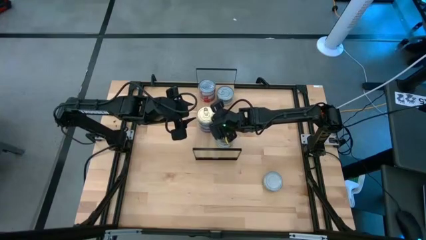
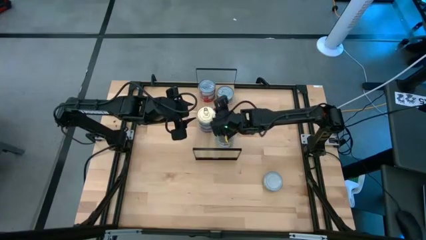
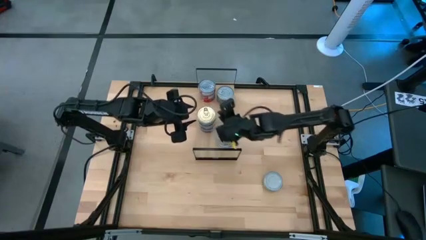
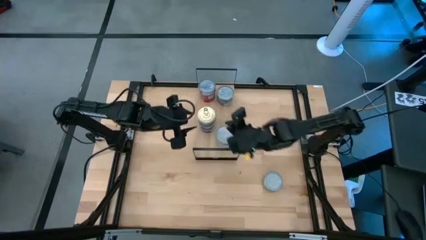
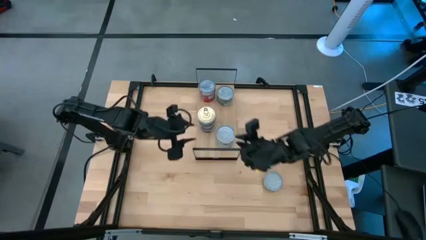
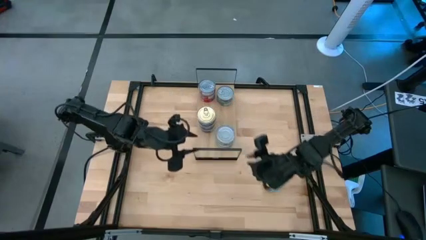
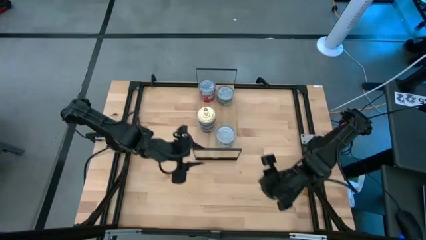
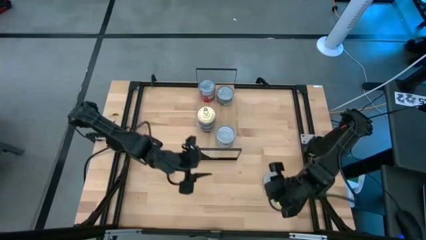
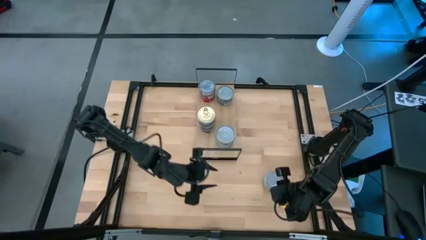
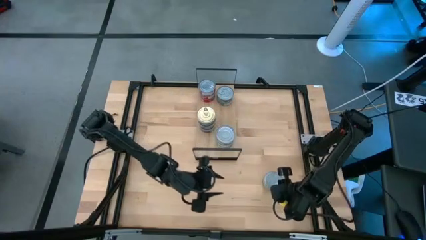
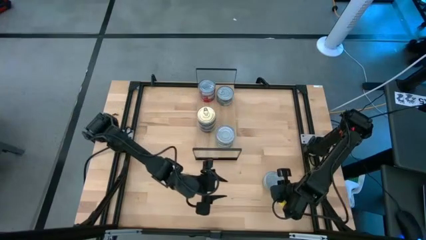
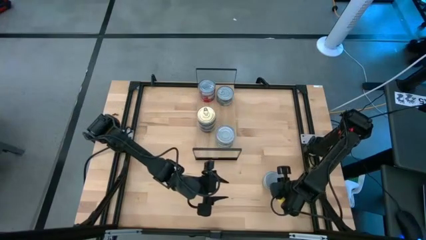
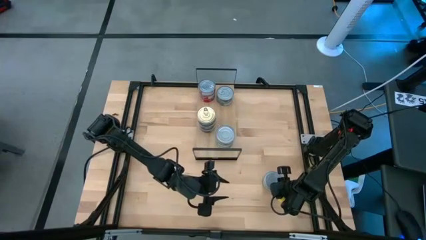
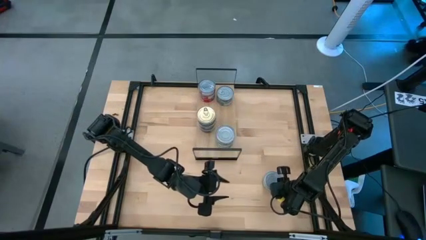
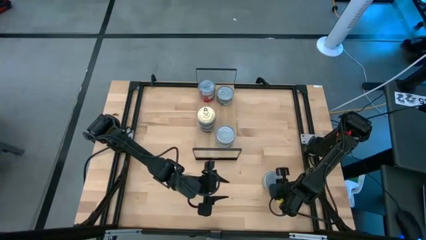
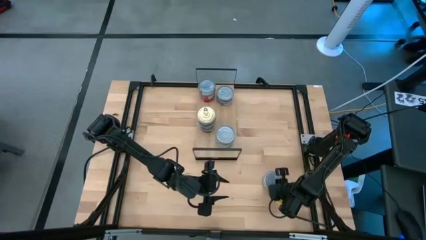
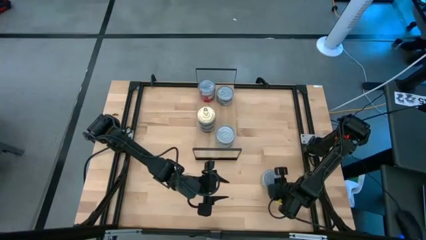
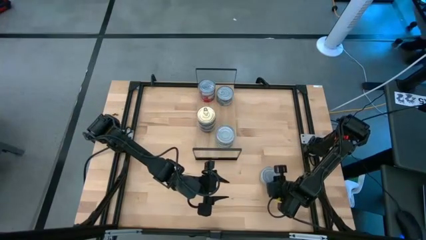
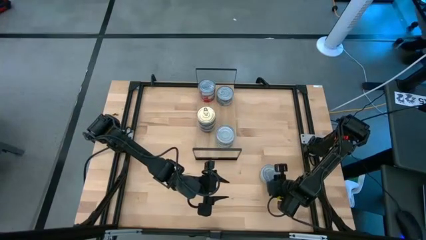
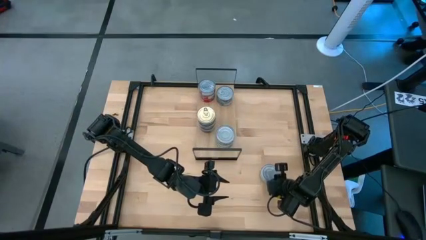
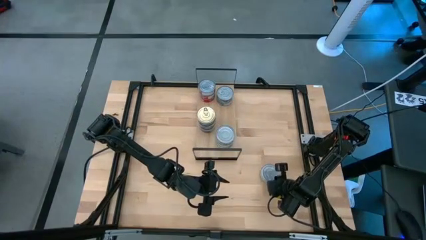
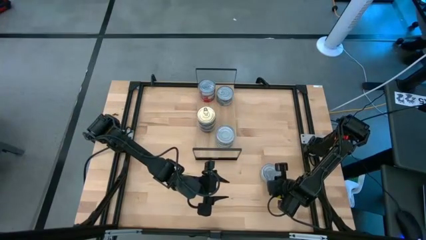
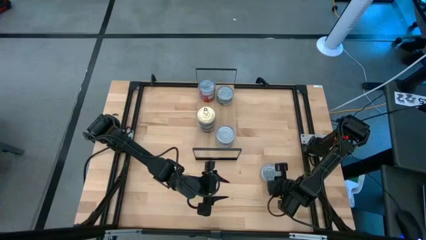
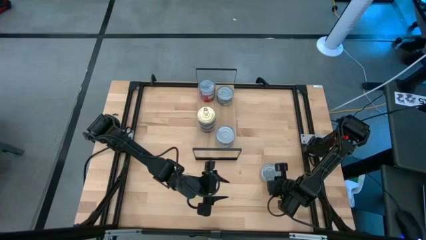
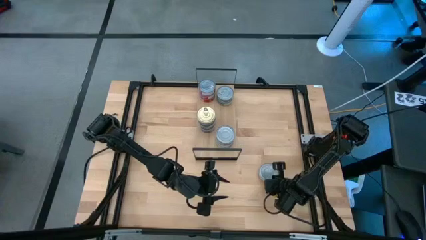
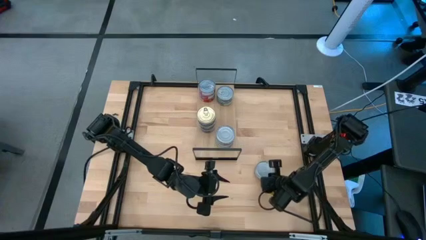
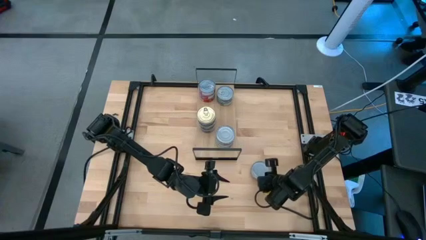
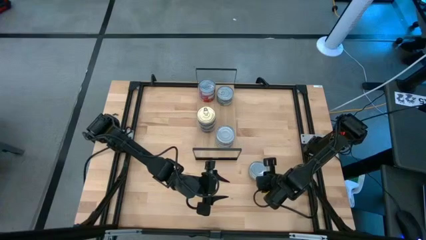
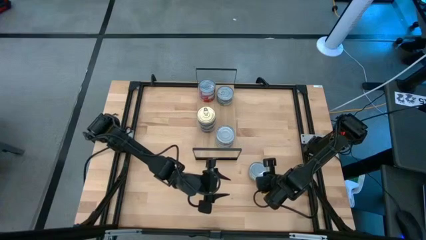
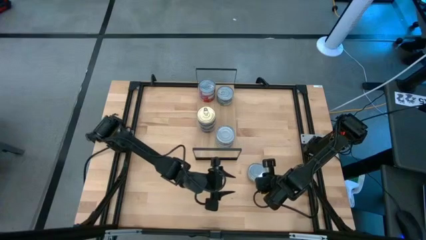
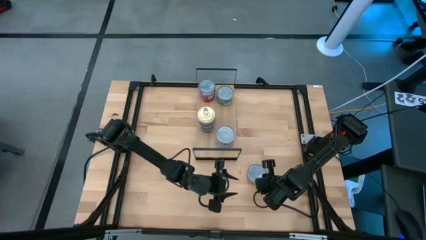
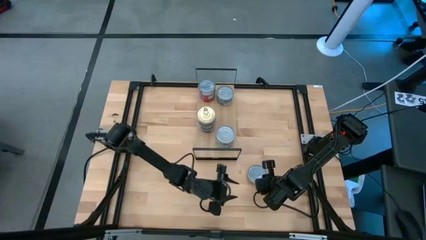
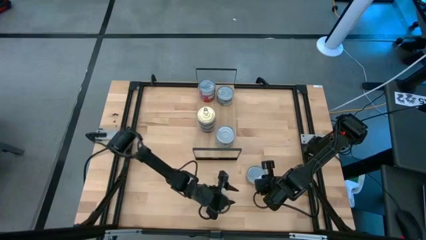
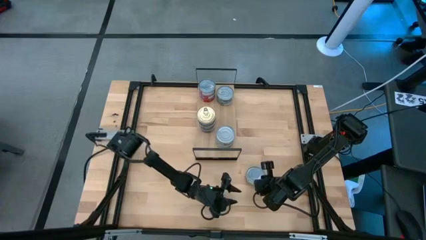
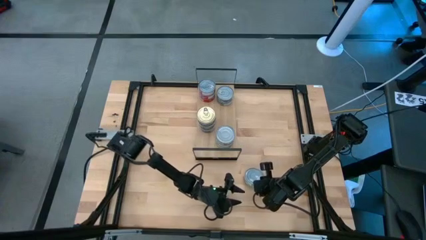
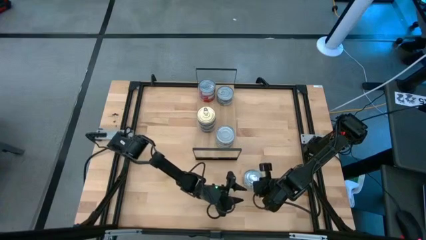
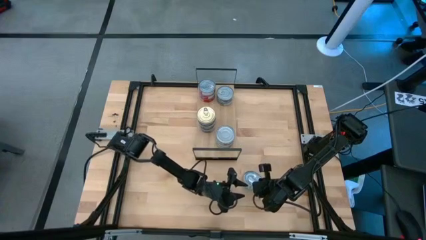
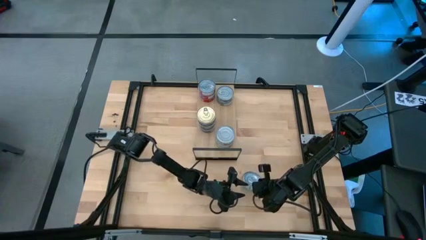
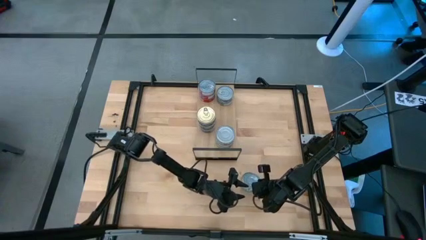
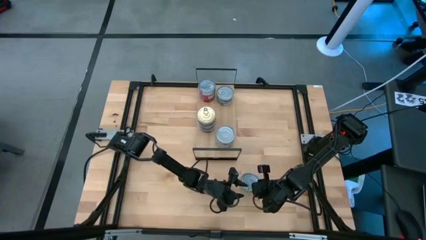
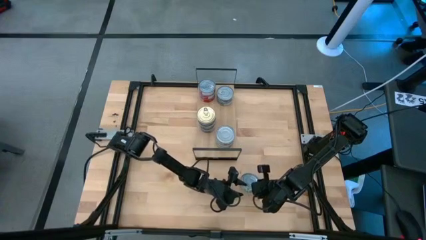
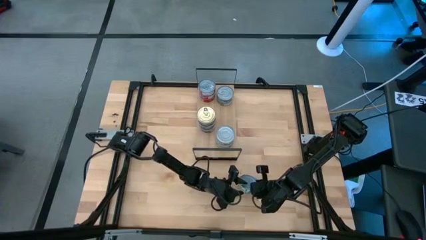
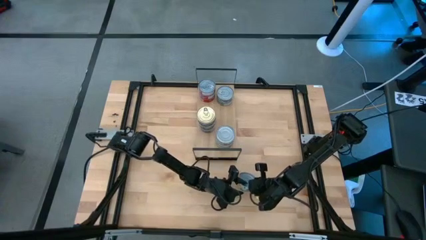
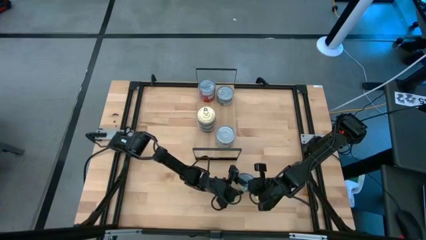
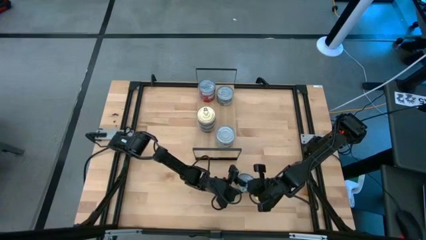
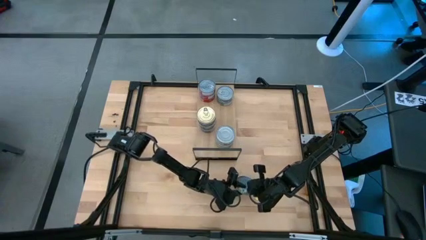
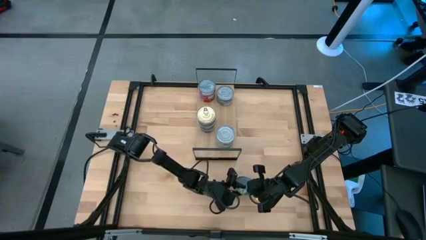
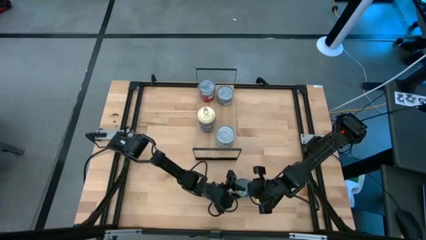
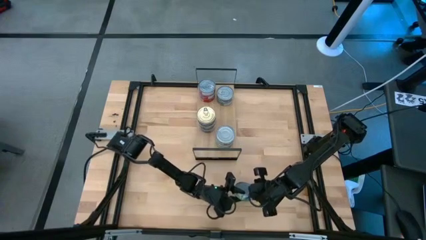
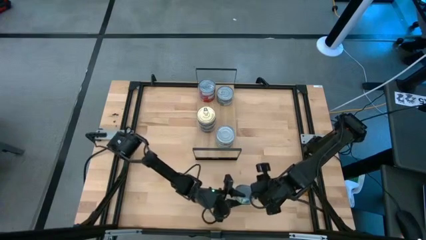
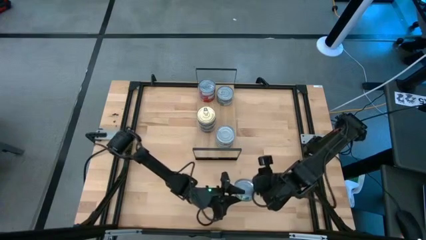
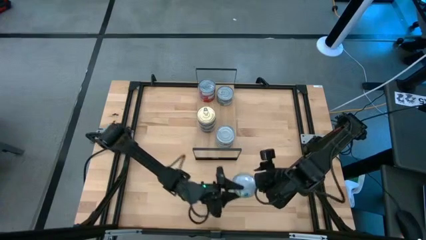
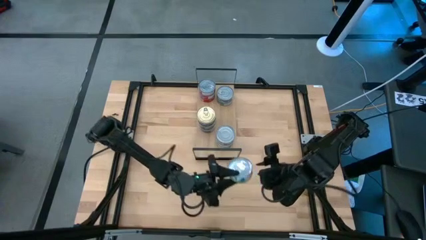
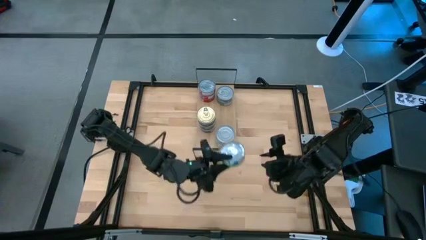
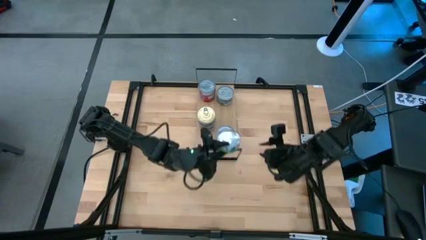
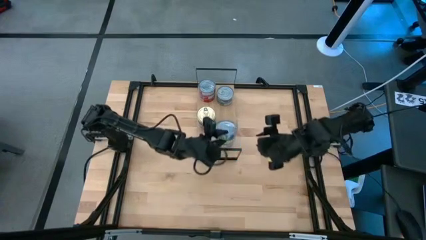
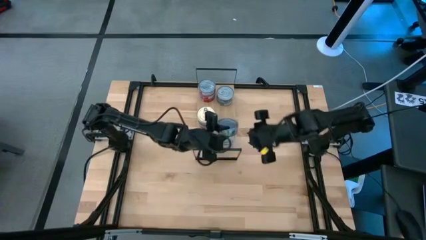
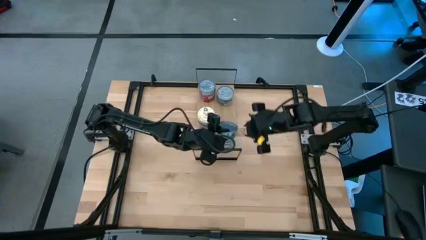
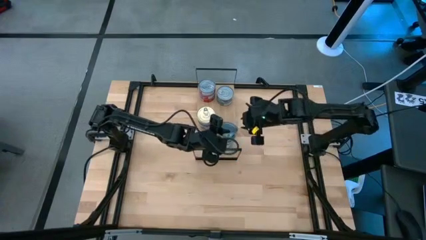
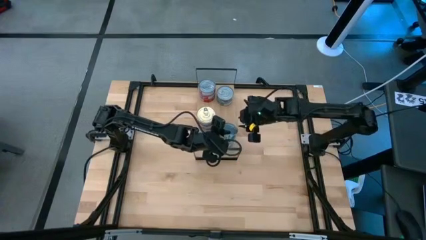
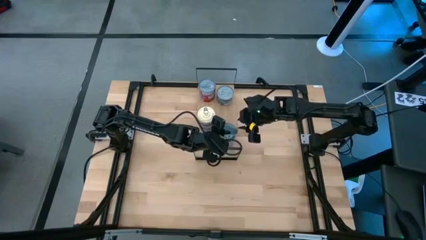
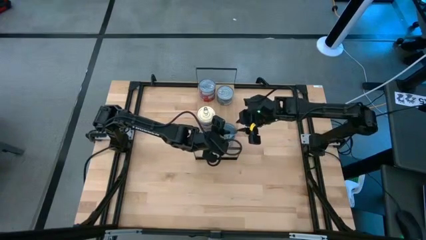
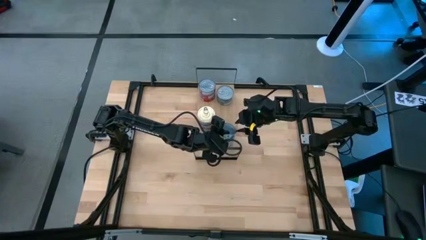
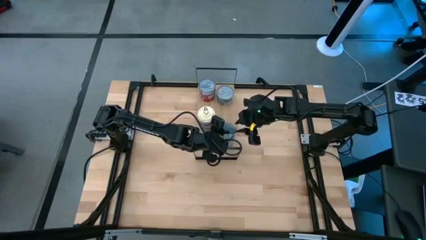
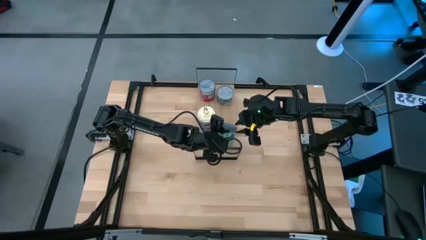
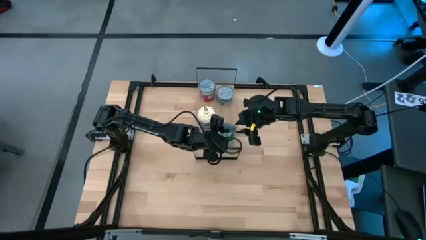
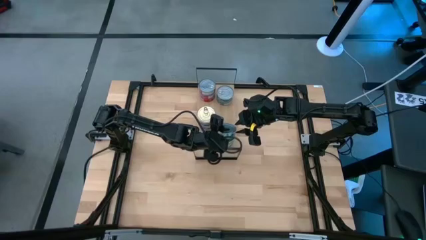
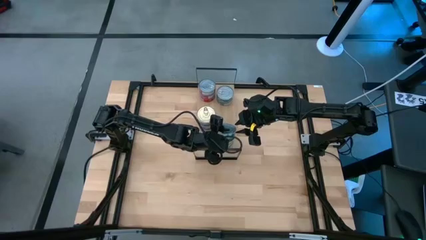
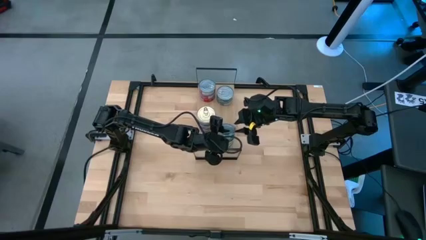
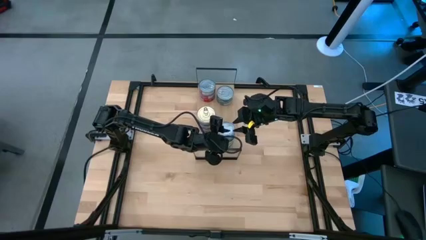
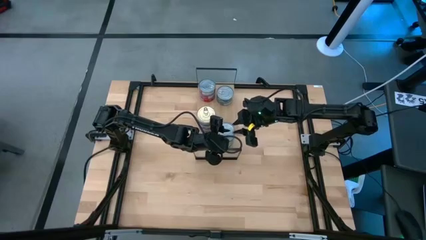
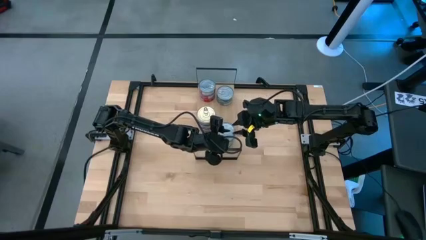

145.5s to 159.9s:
Task: Stack canned seafood by type on shelf
Stack the green tuna can on top of the other green tuna can on the shelf
